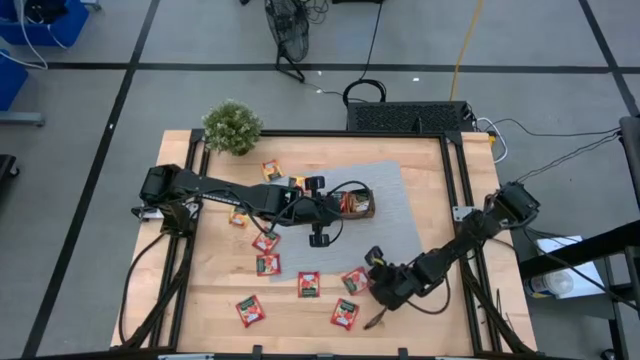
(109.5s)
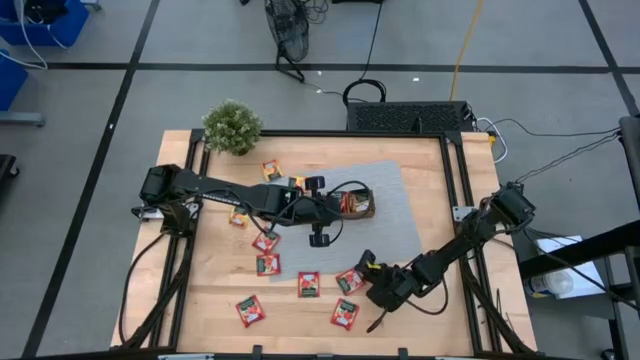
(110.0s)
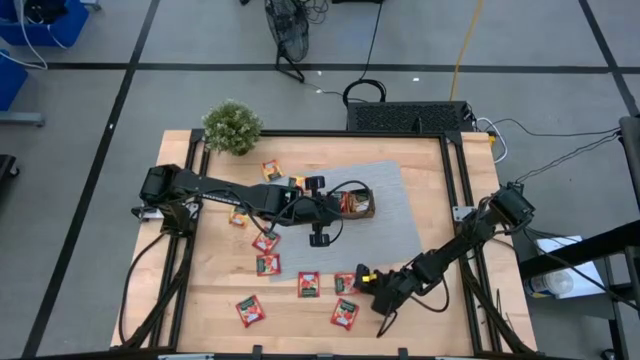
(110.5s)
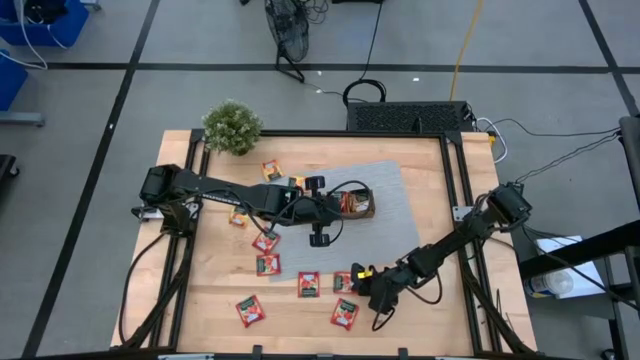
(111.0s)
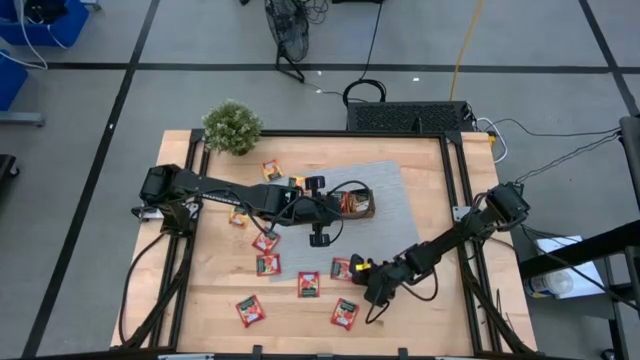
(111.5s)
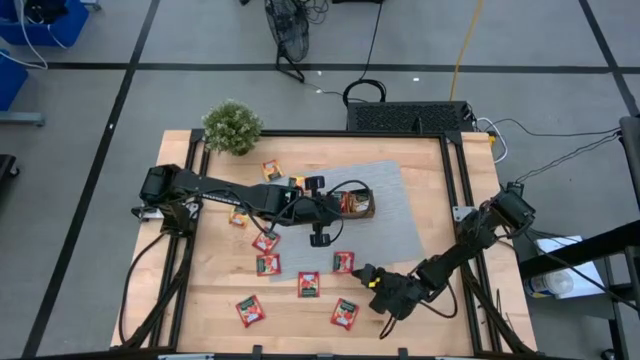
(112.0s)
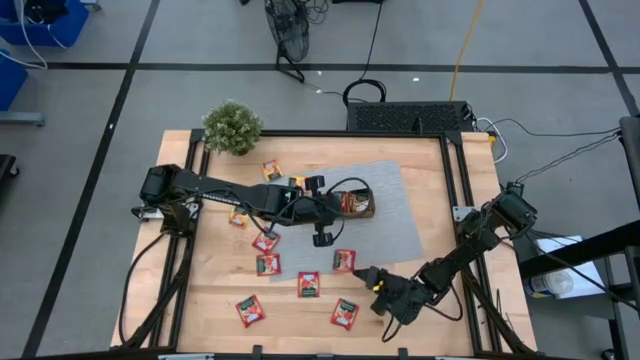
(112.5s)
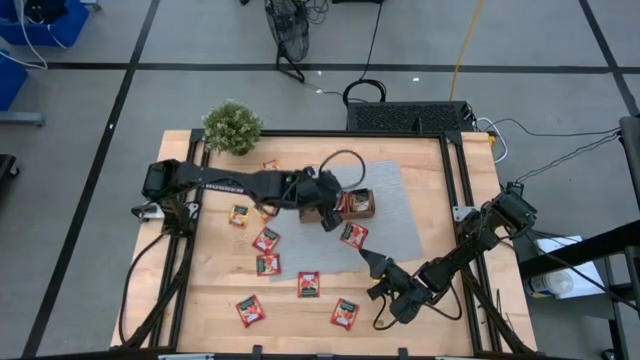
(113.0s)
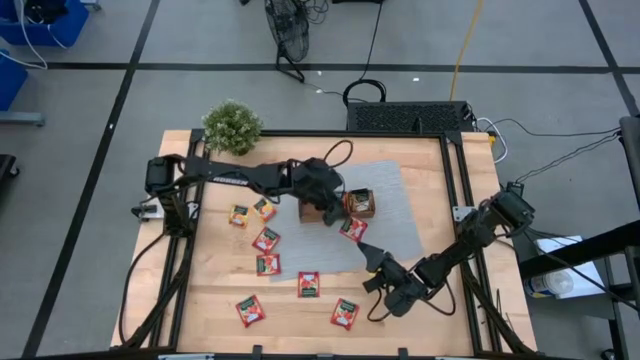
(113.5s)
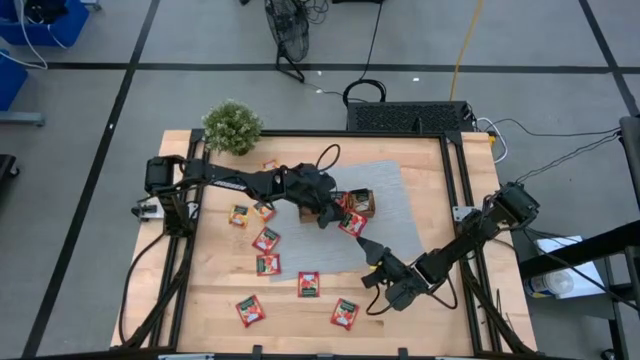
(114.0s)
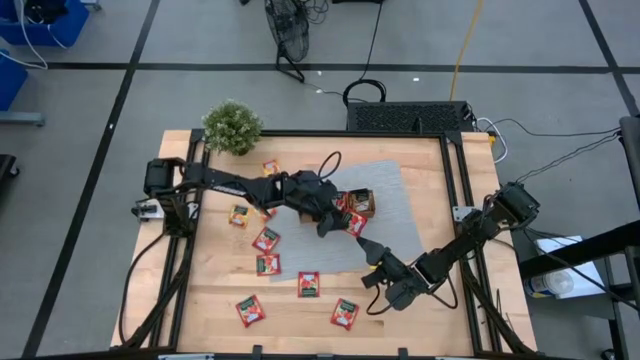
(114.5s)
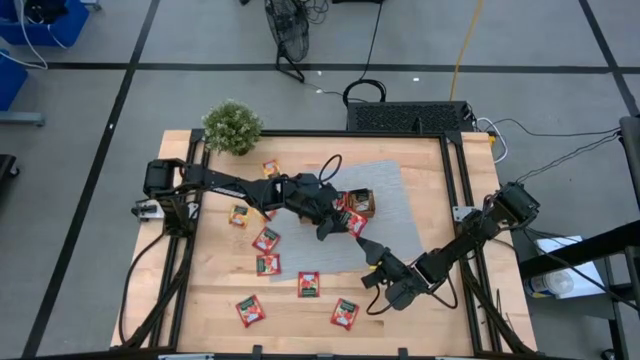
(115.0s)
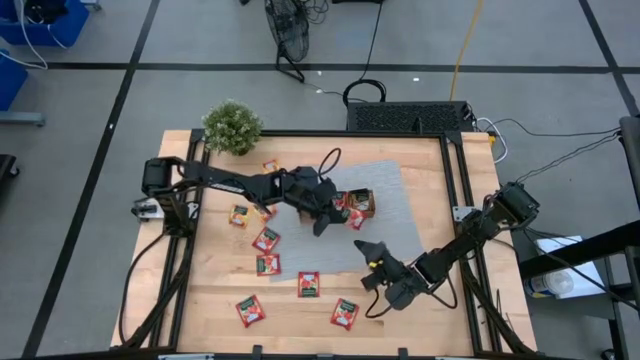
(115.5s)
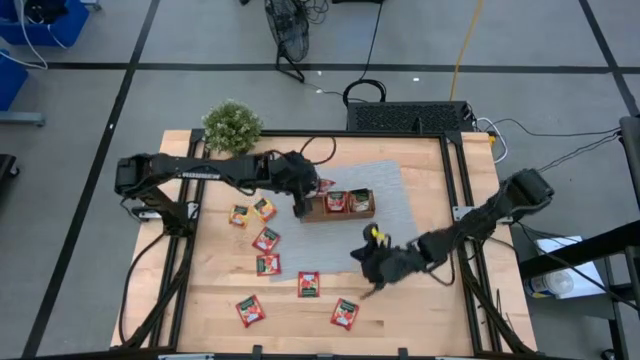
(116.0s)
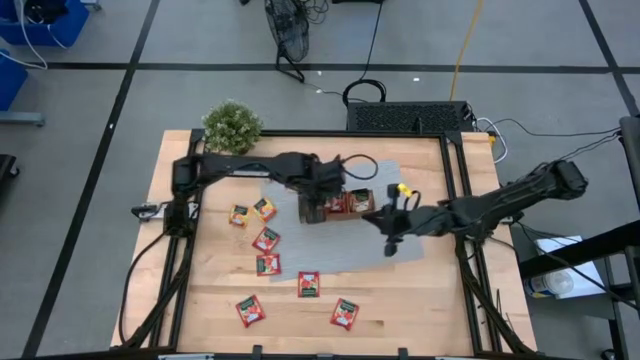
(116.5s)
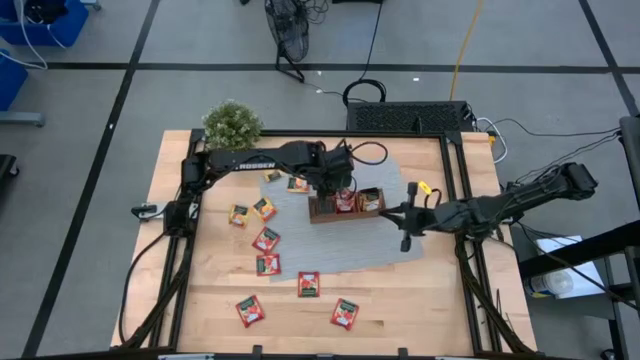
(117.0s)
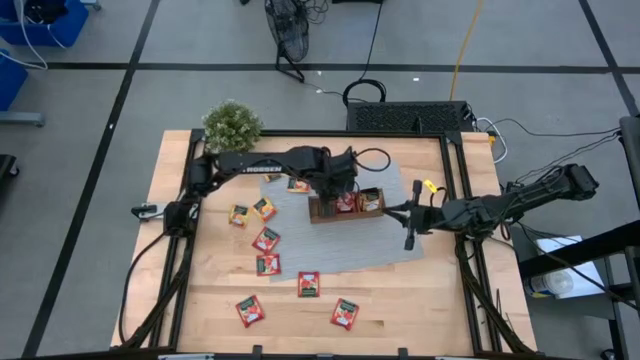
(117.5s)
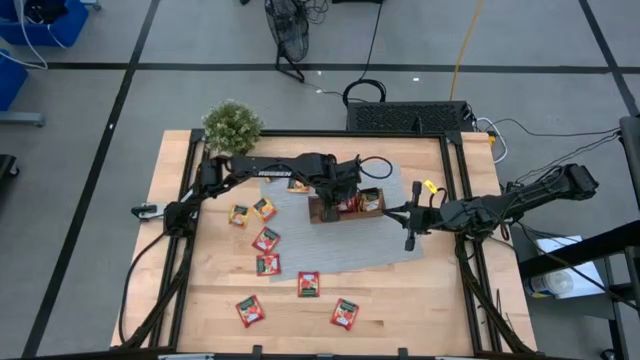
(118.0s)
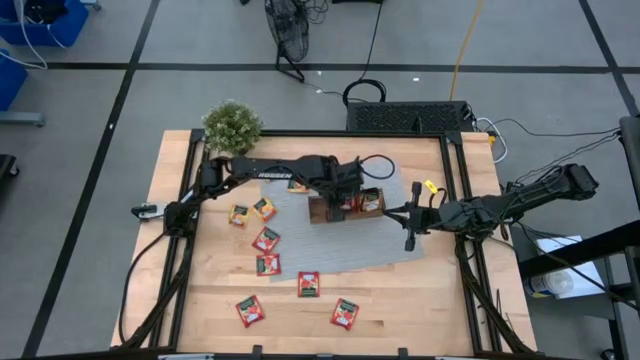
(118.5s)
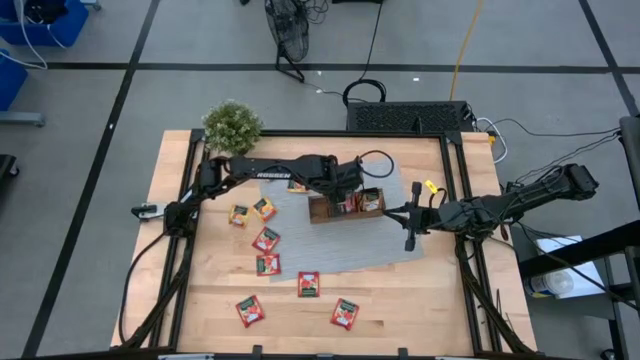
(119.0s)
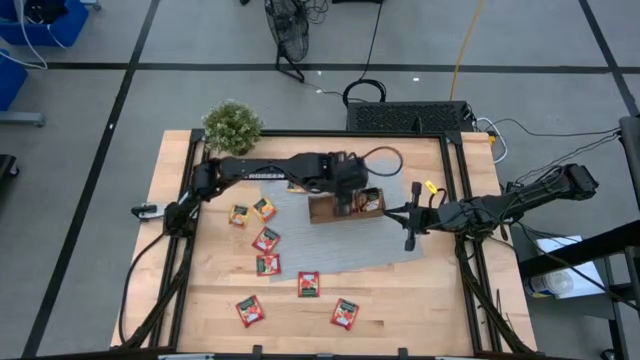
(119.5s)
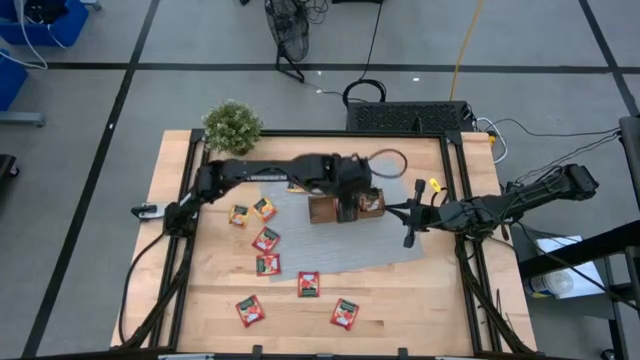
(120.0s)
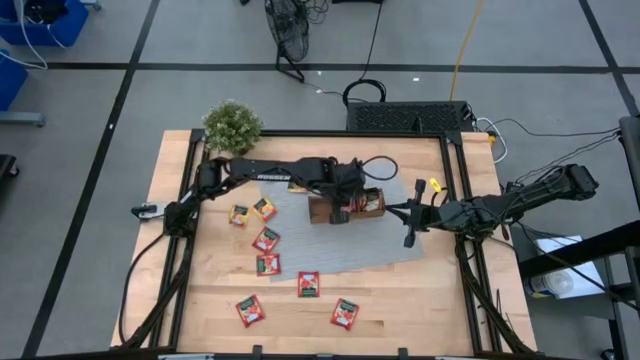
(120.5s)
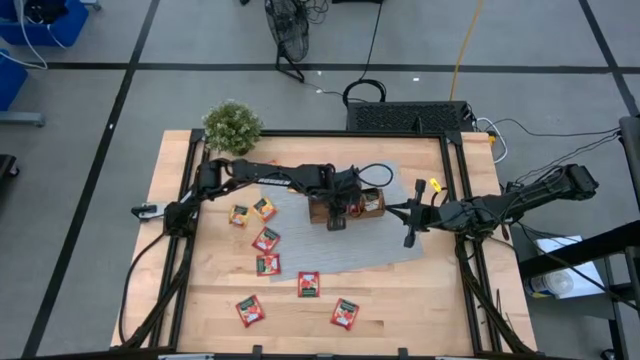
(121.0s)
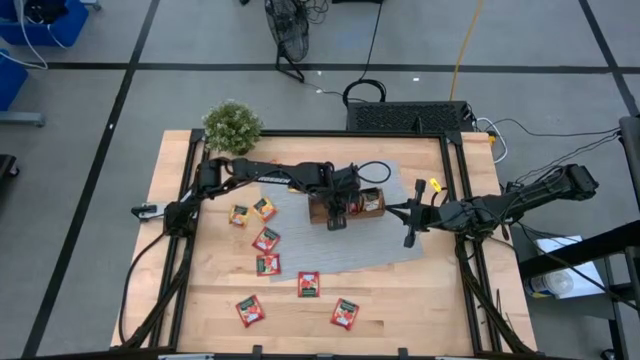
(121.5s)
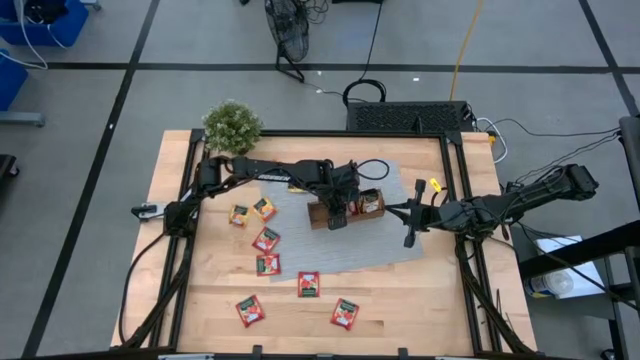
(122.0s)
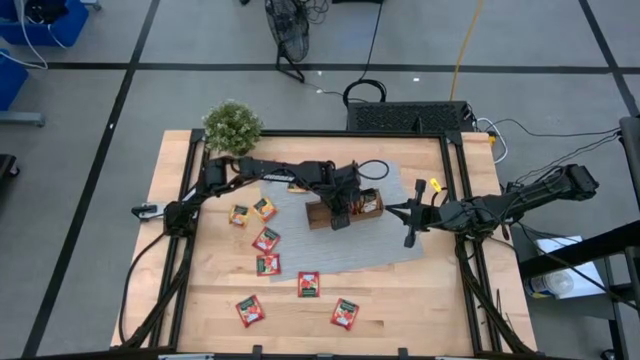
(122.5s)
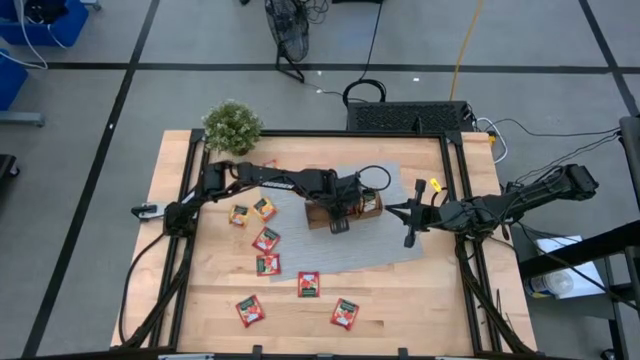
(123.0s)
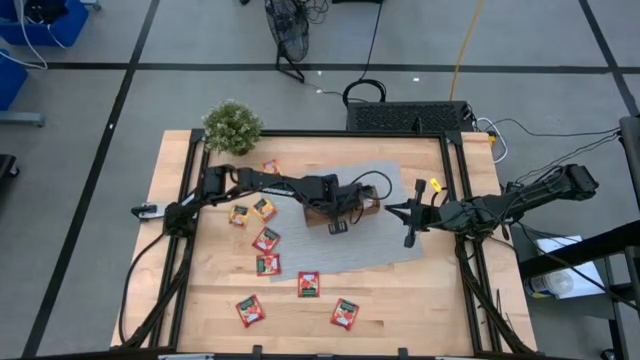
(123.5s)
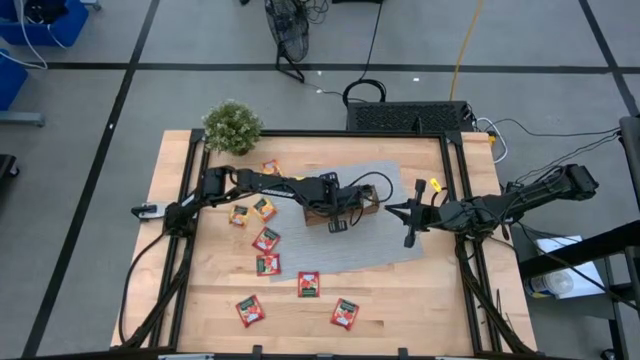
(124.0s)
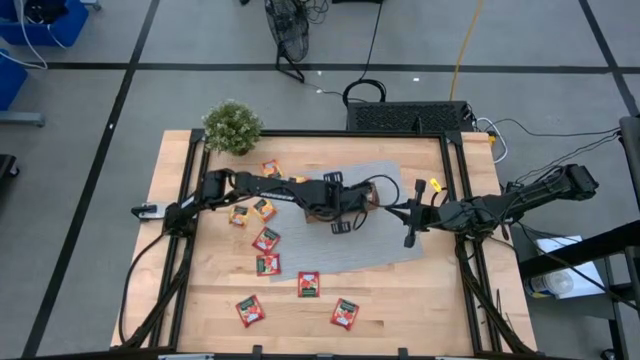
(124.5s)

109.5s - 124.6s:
Task: Pick & Place Tea
Put the red tea bag into the middle section of the wooden organizer

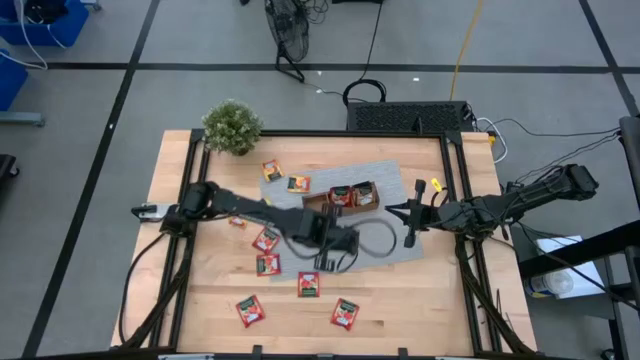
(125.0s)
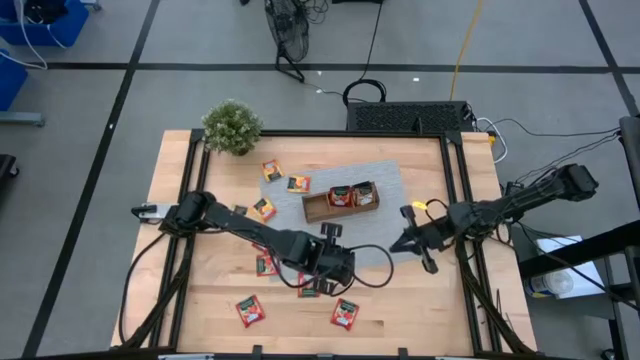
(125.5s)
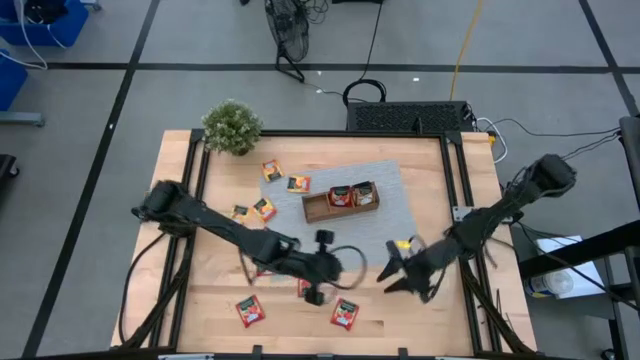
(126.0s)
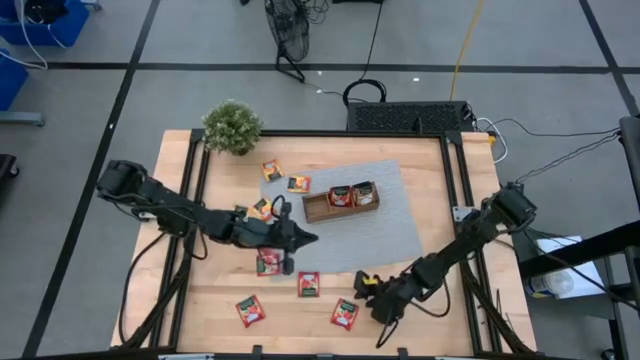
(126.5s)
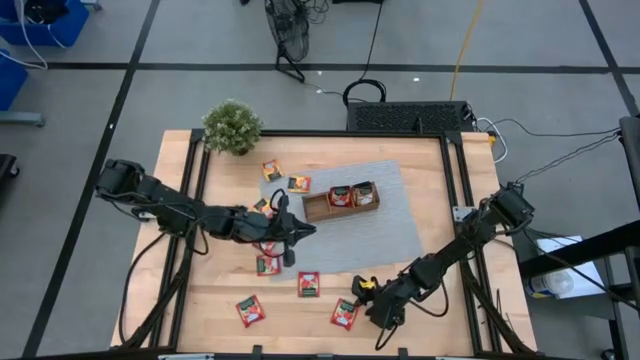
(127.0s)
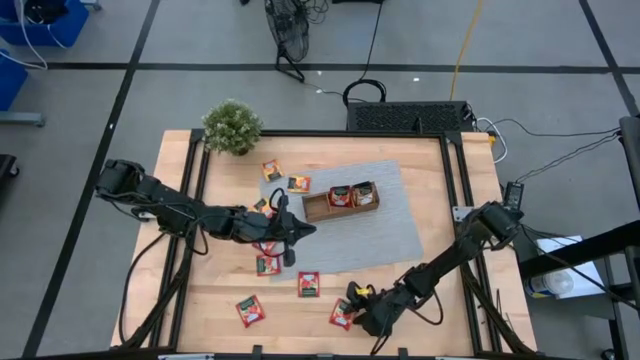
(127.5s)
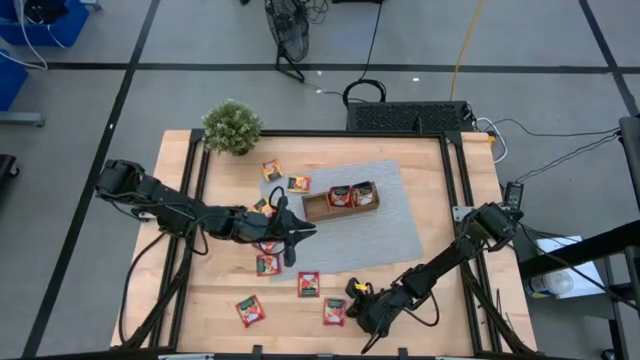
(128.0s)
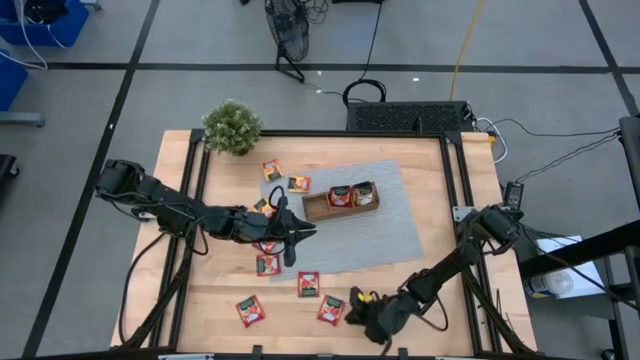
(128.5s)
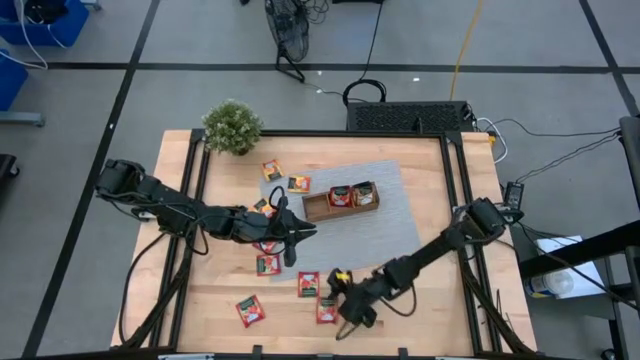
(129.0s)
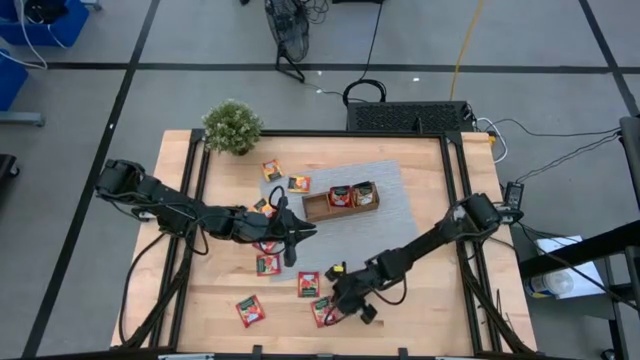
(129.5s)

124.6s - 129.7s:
Put the red tea bag into the middle section of the wooden organizer

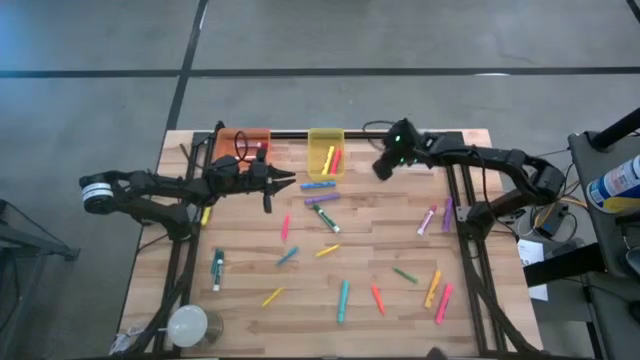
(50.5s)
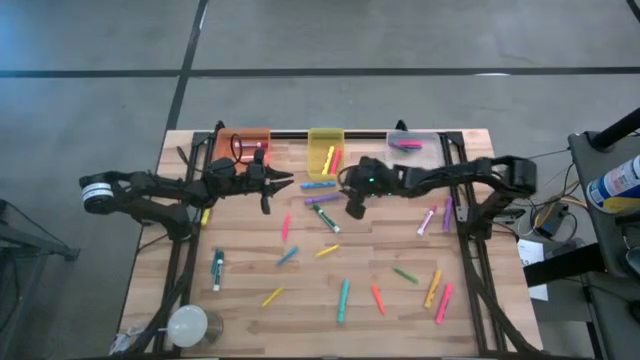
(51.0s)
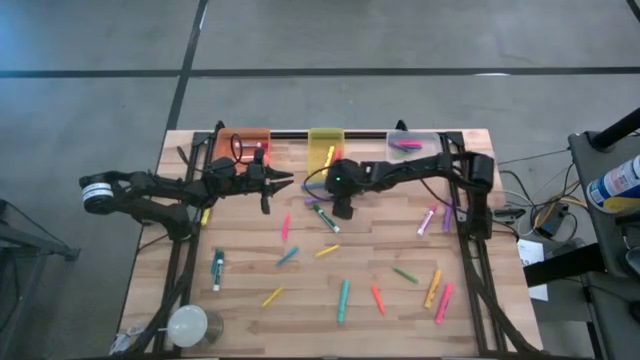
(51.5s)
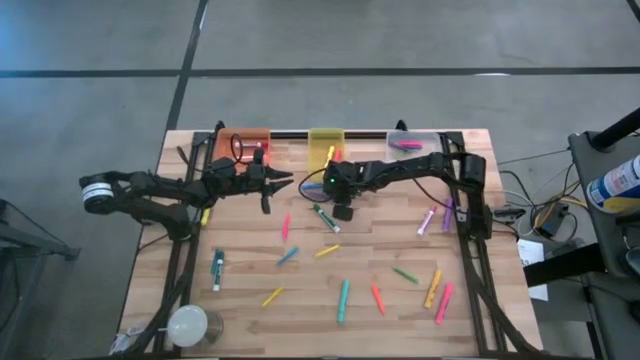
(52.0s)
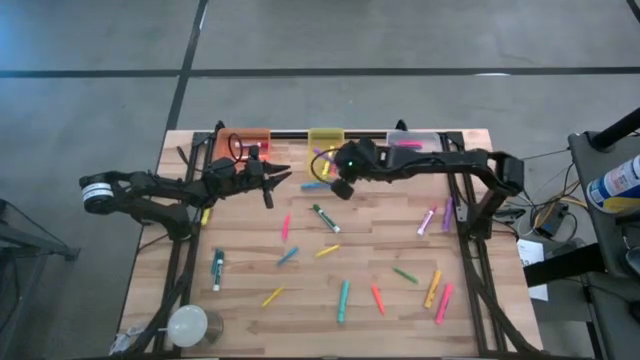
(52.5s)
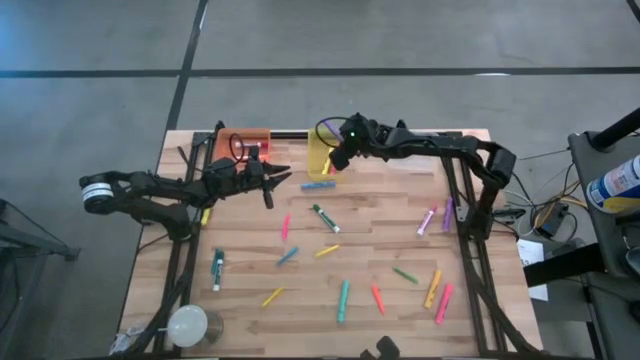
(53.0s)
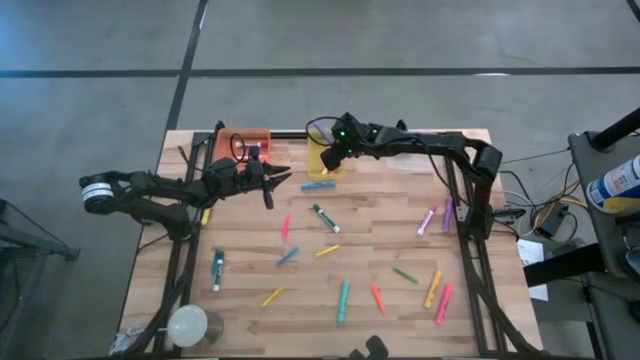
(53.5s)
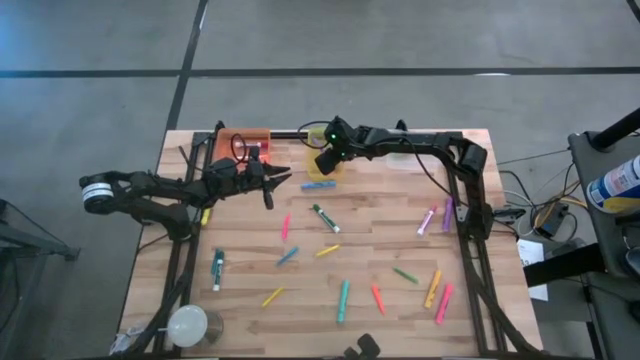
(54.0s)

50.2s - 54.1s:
Task: Pick & Place Markers
Put the left violet highlighter pen into the yellow bin
